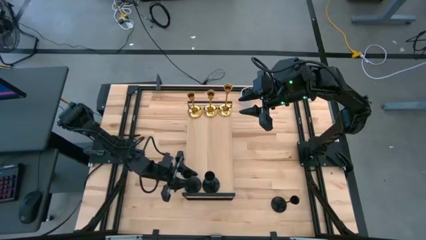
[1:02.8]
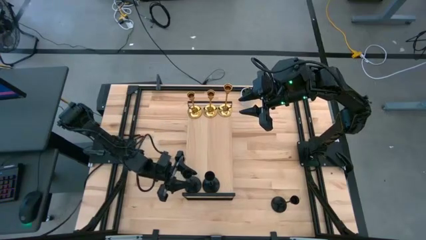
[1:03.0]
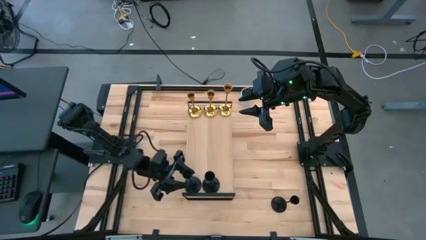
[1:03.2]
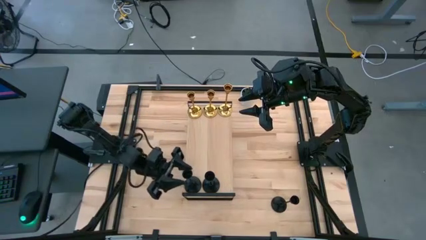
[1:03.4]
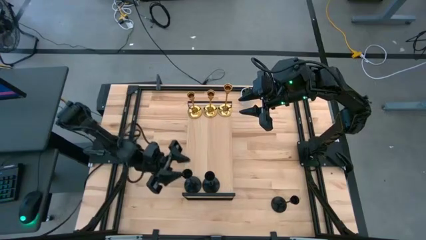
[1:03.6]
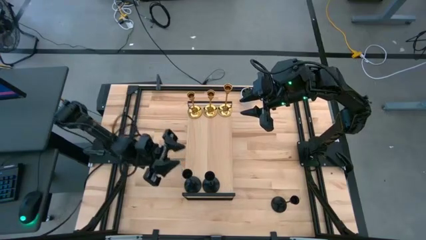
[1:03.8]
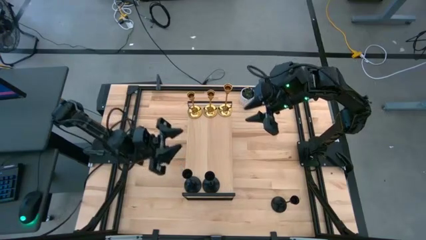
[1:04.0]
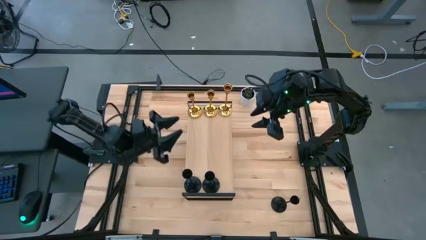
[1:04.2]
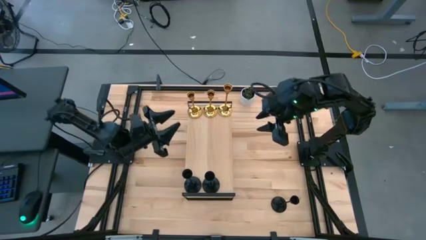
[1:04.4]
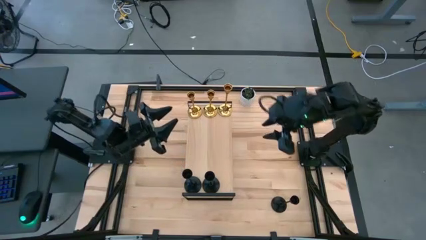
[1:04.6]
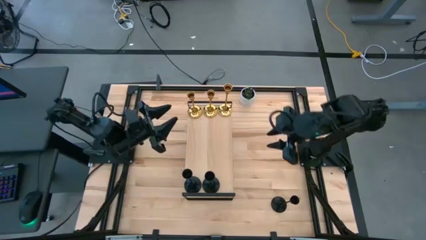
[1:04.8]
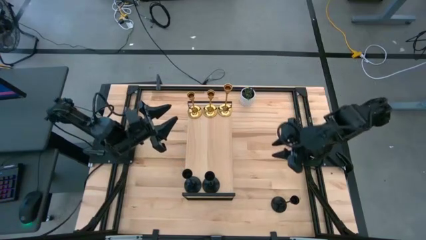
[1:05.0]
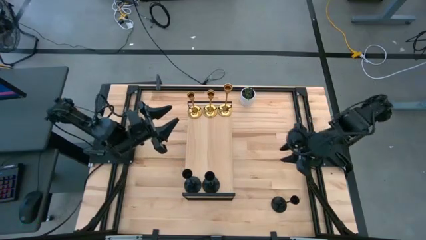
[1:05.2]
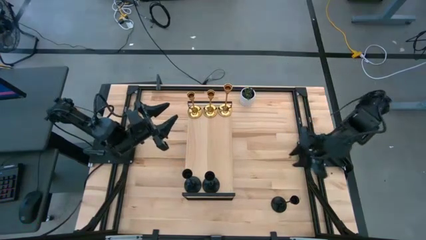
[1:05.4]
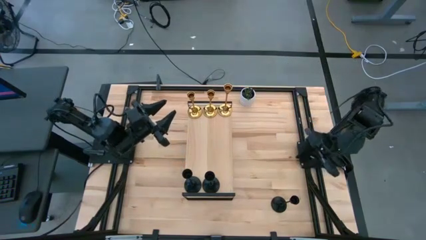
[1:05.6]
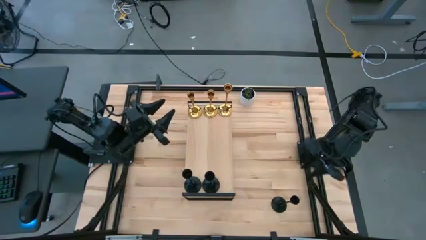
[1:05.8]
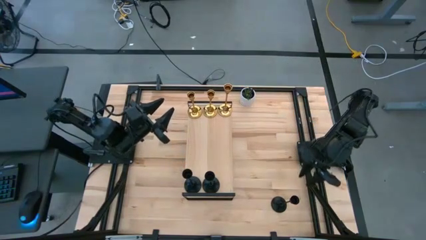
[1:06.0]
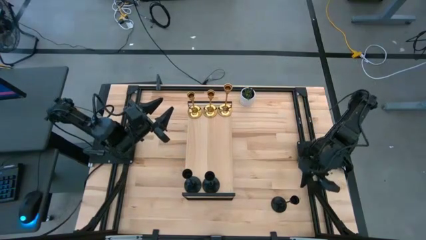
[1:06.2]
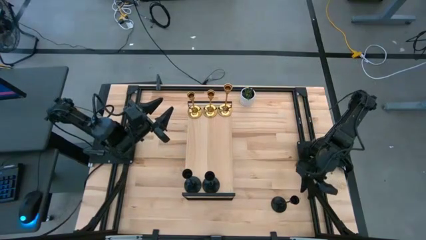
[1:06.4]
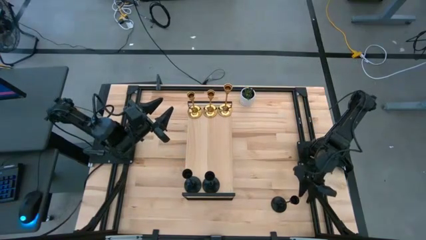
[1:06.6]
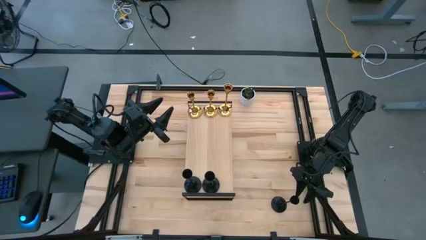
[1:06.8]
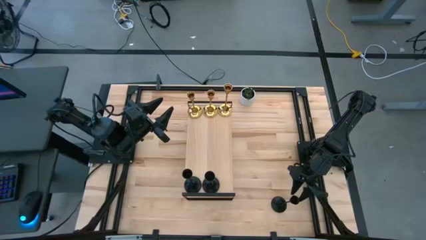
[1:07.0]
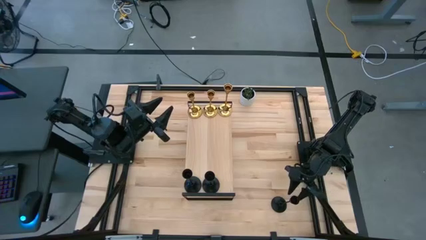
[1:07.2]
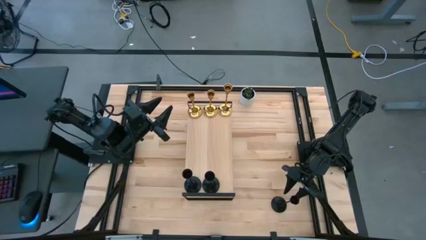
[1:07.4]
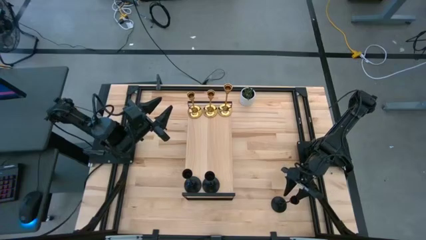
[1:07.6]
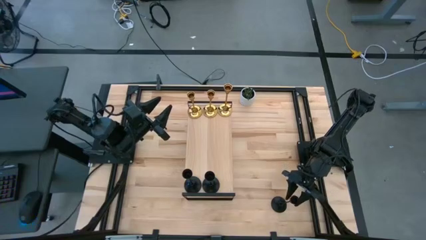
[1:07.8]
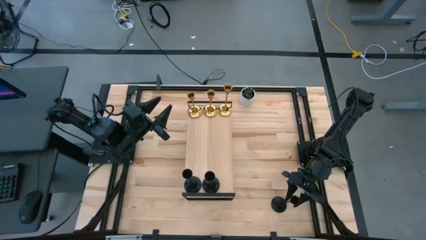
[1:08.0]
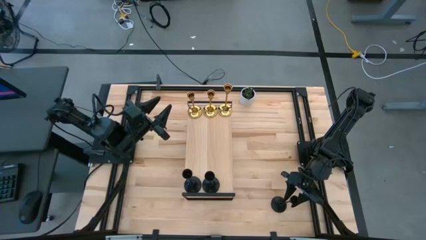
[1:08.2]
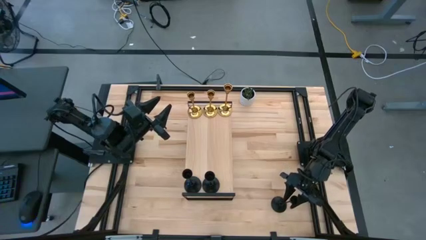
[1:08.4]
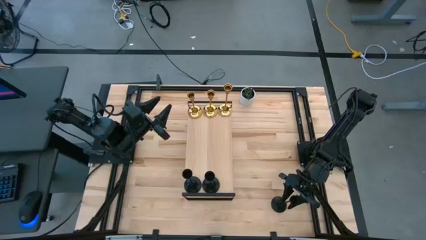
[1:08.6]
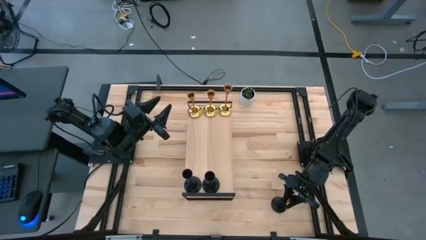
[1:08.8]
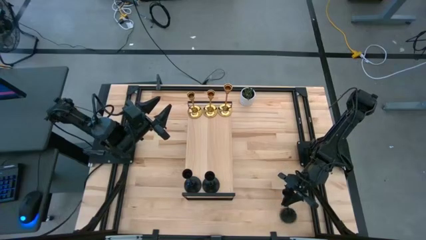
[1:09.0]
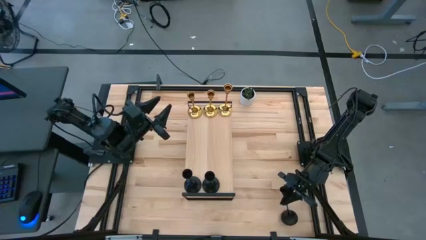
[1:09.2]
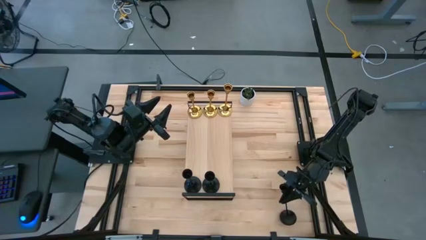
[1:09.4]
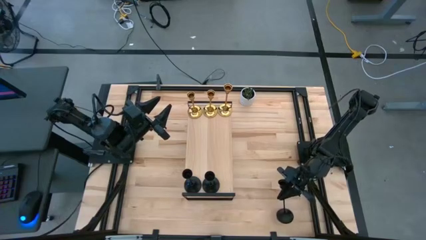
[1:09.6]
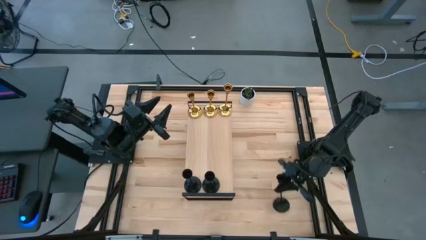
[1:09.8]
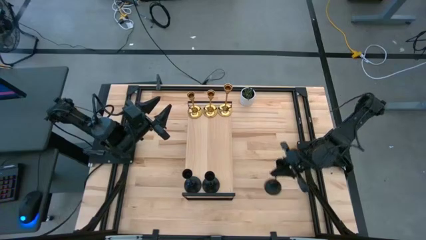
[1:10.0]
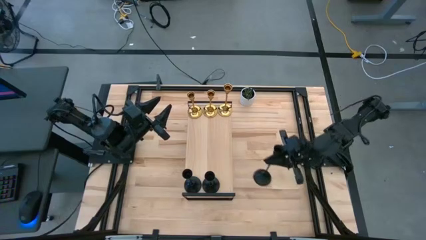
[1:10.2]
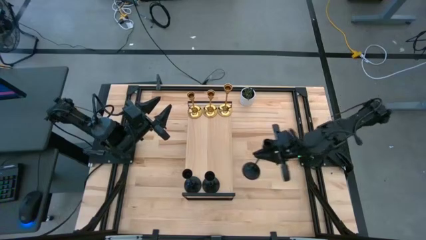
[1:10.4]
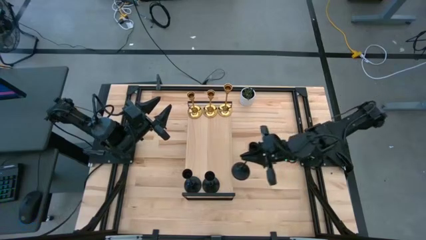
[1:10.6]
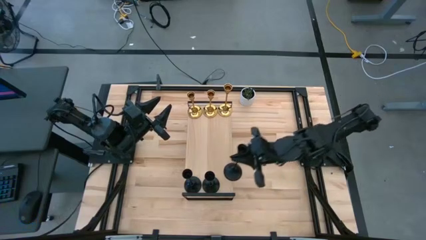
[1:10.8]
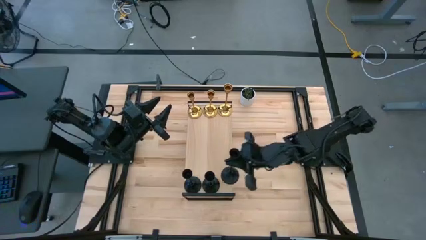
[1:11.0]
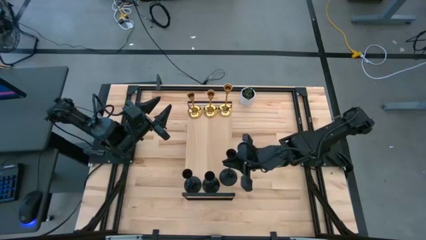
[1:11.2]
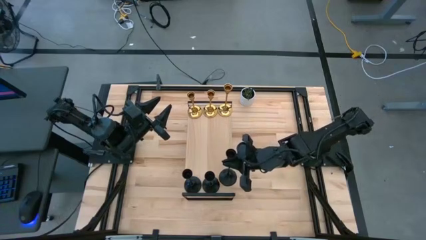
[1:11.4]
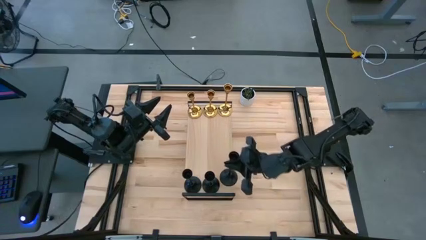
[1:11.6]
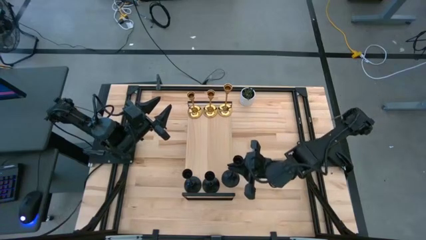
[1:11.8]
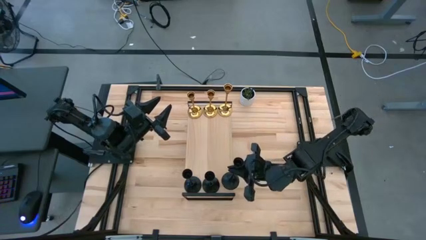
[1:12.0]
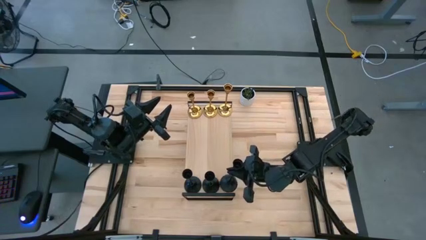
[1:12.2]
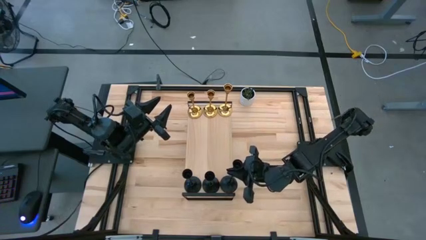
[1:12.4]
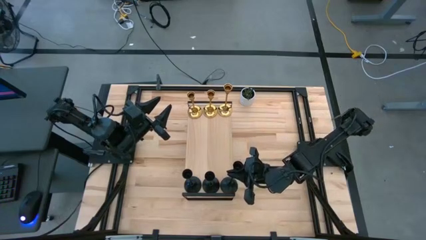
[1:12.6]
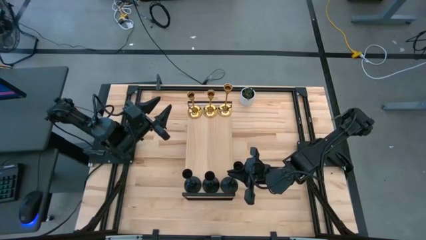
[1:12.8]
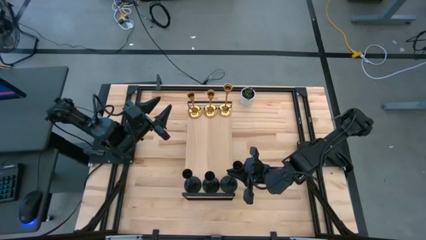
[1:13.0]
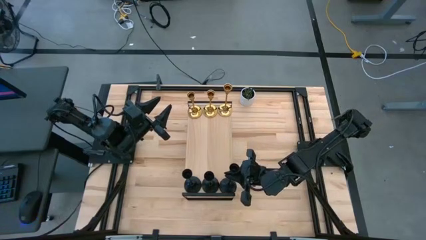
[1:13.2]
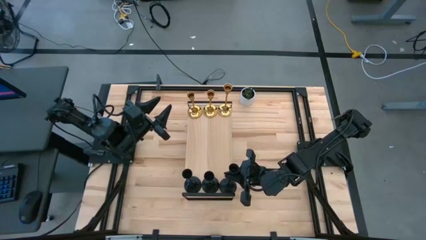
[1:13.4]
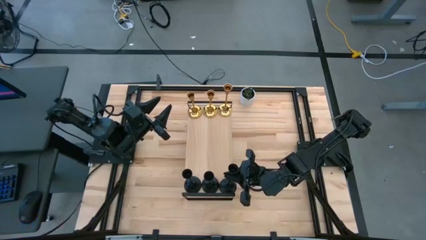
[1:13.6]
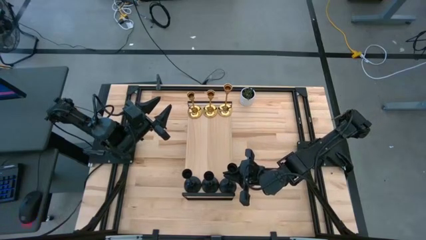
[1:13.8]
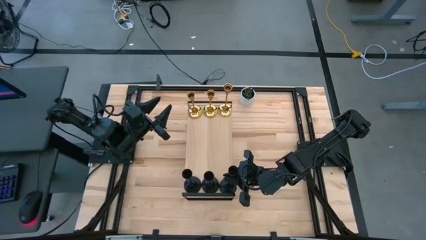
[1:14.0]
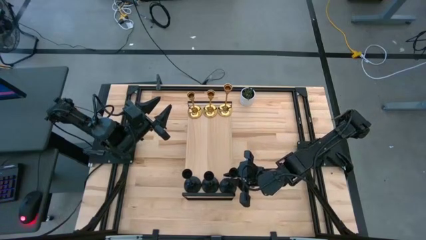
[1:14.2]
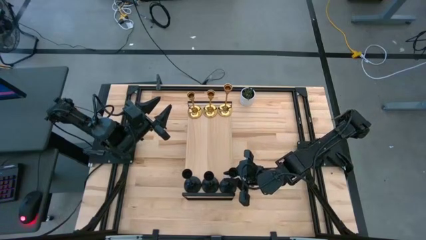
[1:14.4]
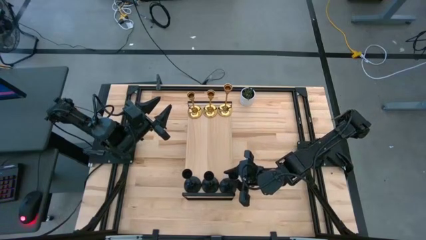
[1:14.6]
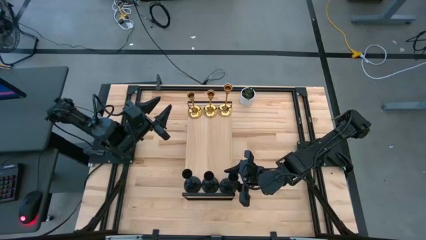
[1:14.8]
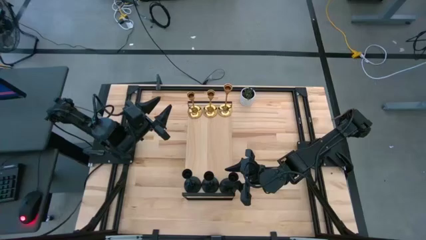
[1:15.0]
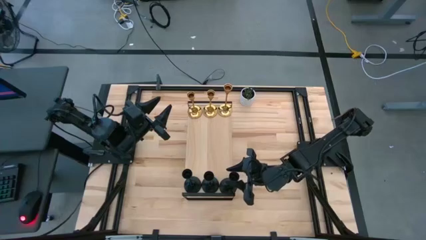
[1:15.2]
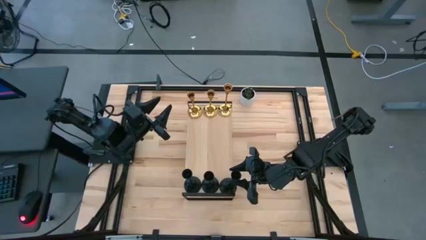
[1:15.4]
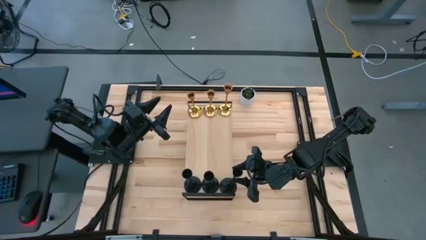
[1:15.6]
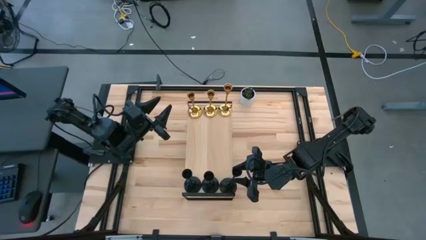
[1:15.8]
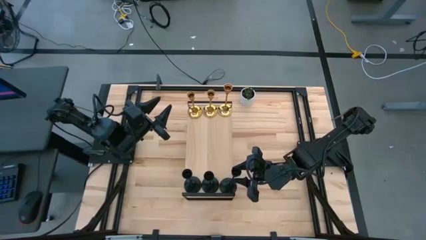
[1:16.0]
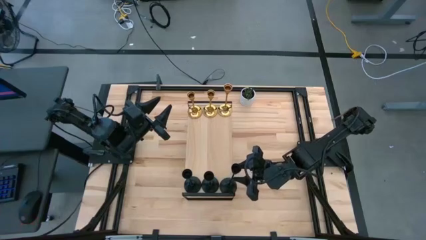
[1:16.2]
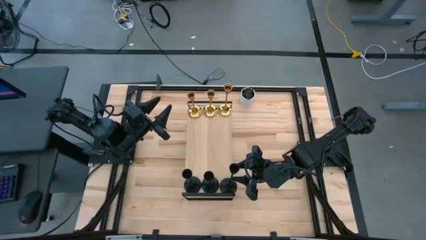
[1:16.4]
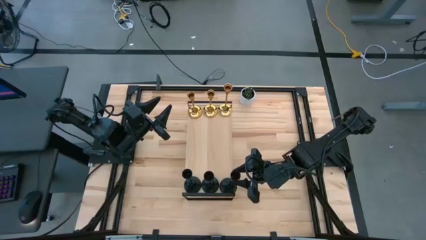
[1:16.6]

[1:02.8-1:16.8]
Task: Pick & Place candle stick holders
Put the black candle holder on the shelf aligned with the other black candle holder
